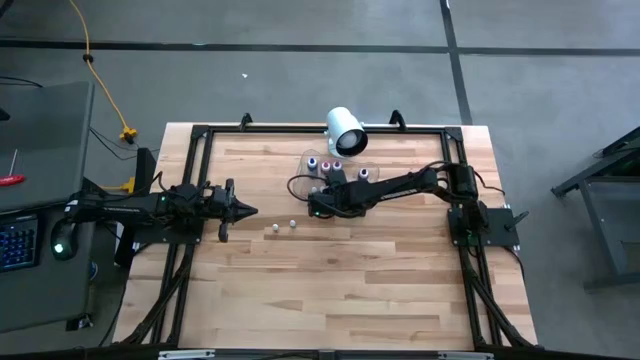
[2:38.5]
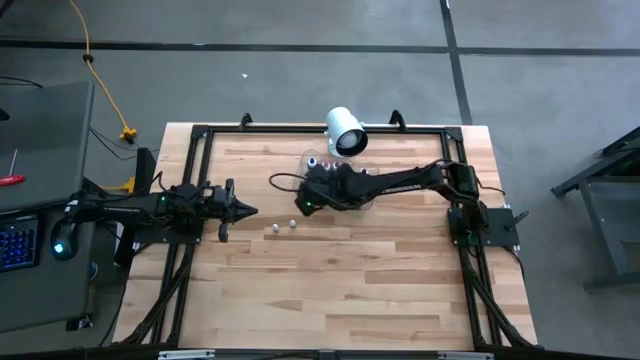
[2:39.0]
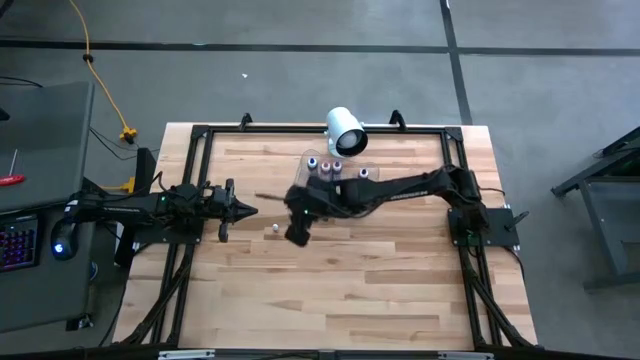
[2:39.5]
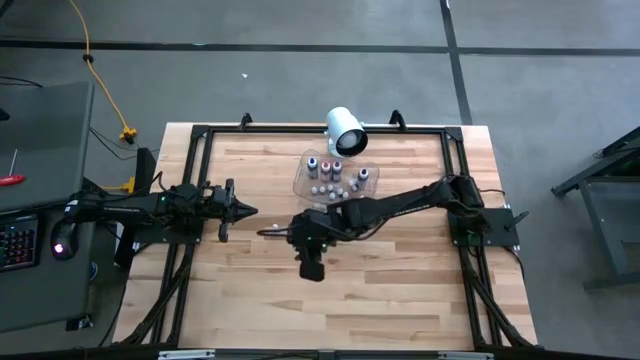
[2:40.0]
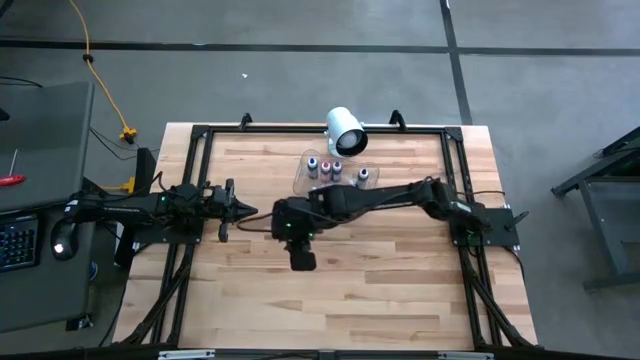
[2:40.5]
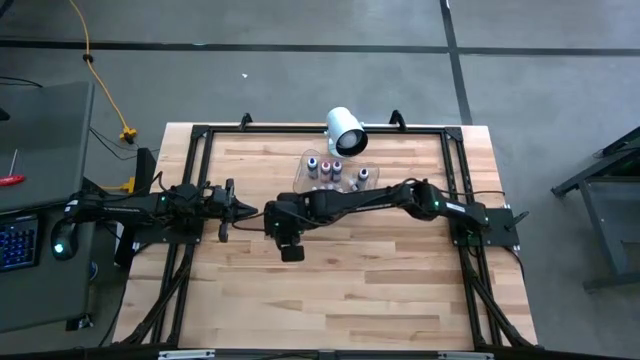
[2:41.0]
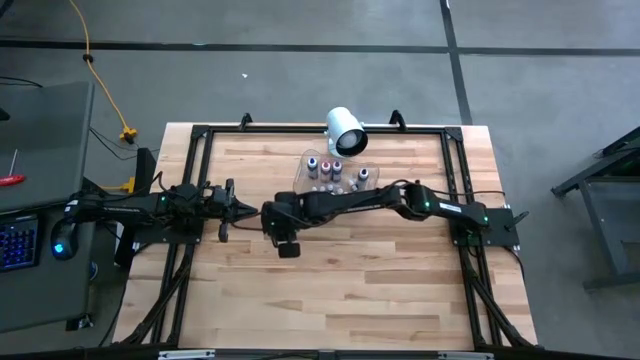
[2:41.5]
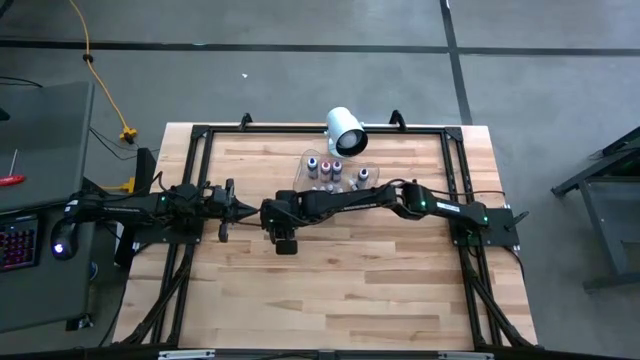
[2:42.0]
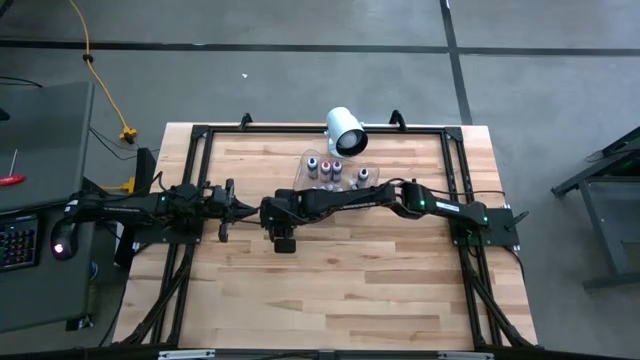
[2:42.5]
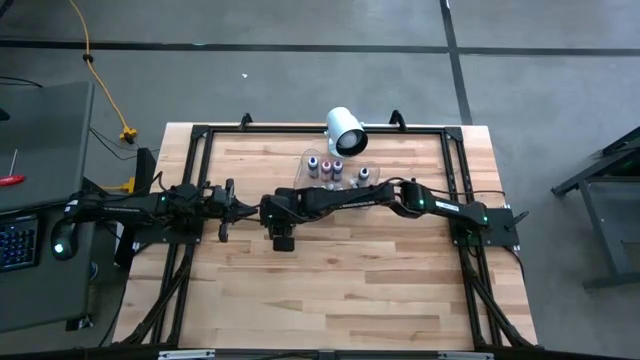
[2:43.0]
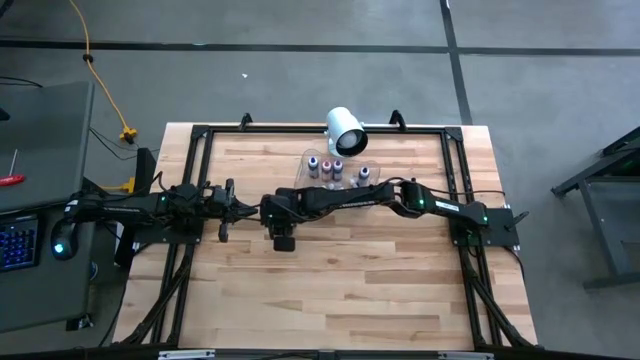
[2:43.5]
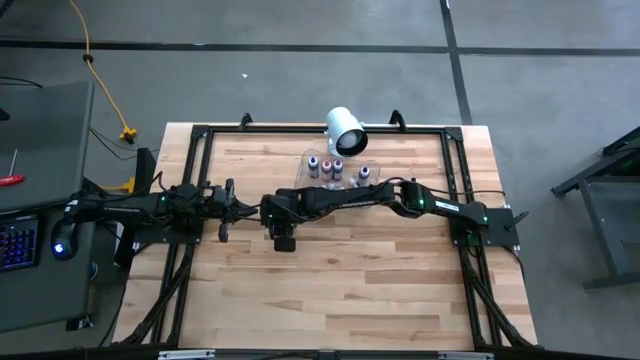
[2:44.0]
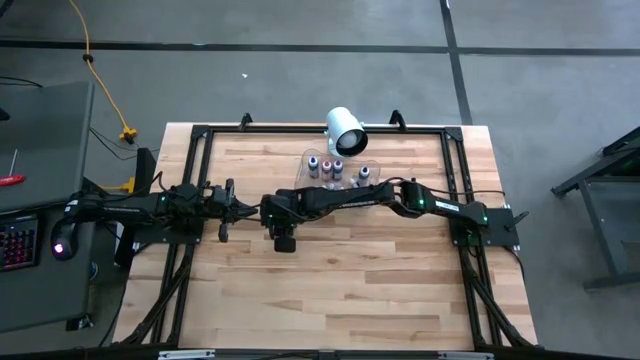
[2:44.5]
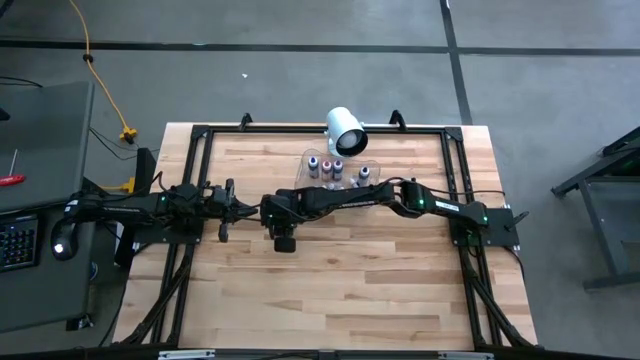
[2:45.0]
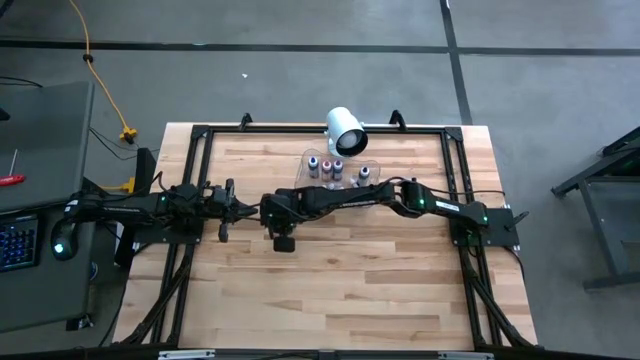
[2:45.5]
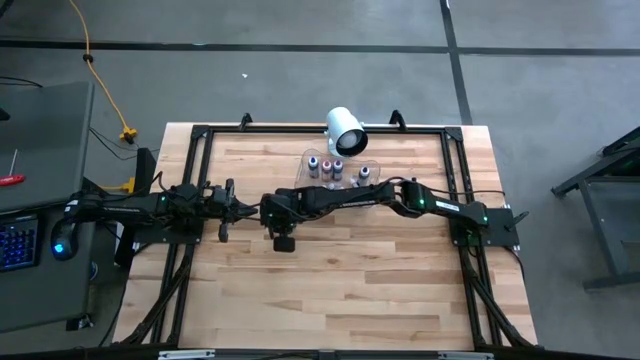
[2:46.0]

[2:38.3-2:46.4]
Task: Pick & Place food coloring
Put the small red food coloring bottle into the transparent bin

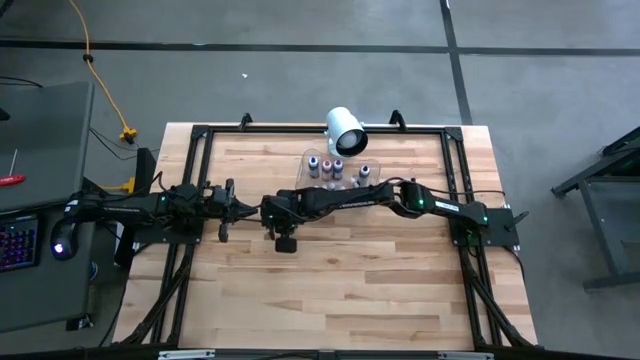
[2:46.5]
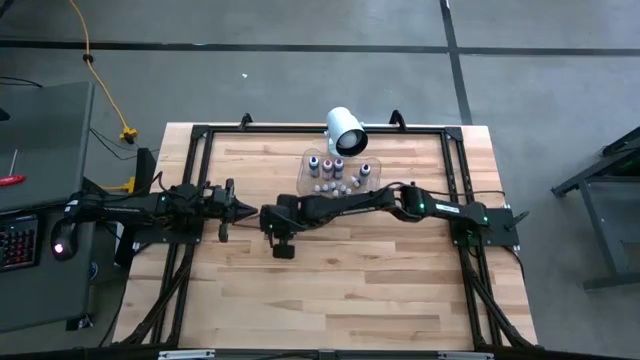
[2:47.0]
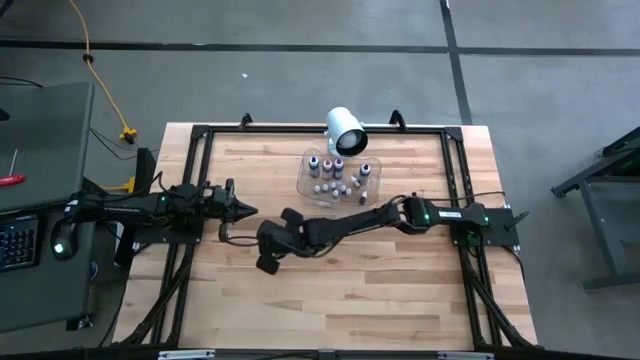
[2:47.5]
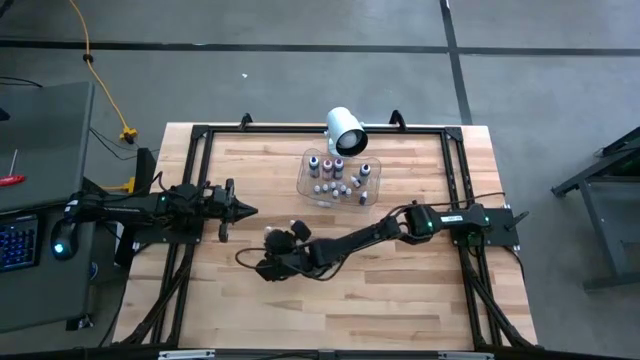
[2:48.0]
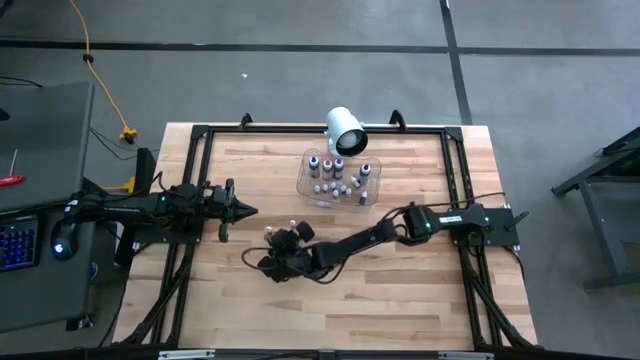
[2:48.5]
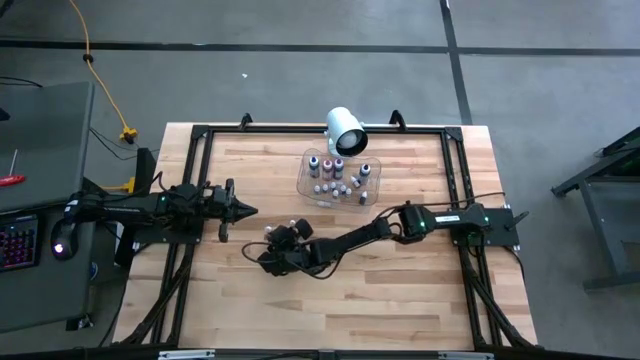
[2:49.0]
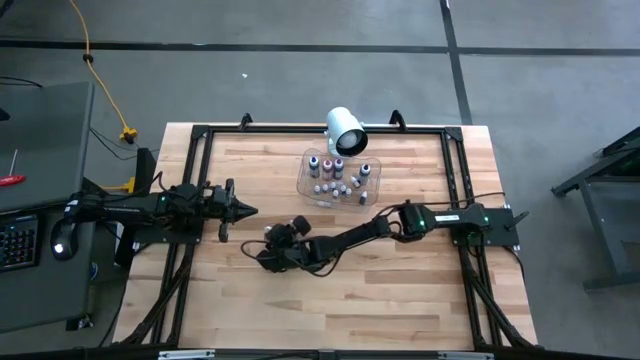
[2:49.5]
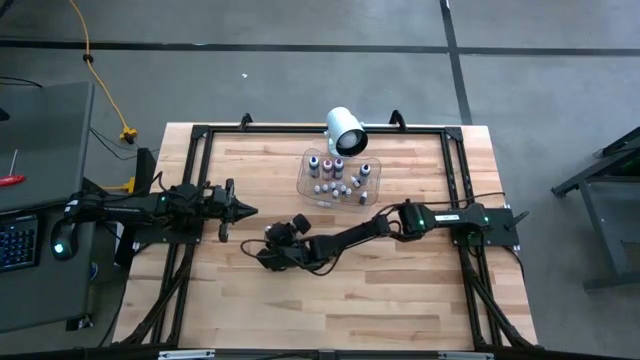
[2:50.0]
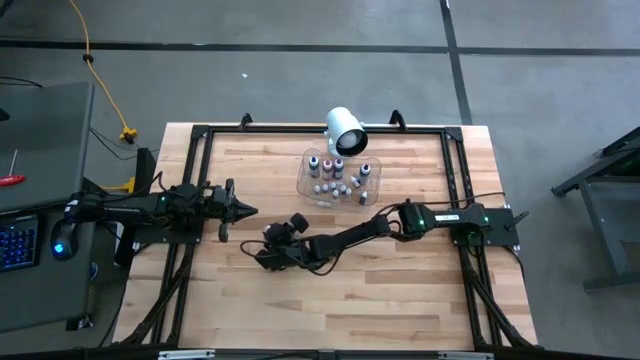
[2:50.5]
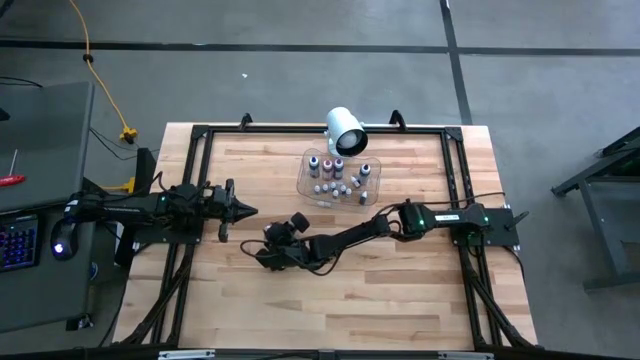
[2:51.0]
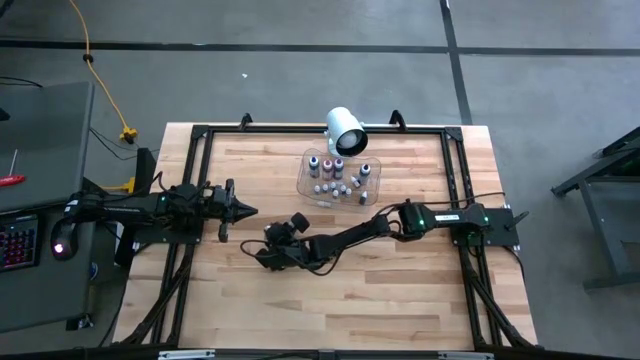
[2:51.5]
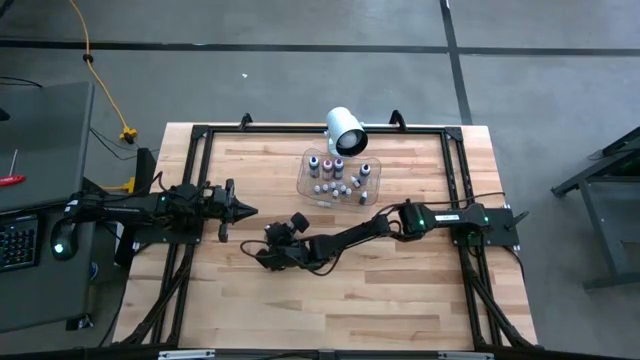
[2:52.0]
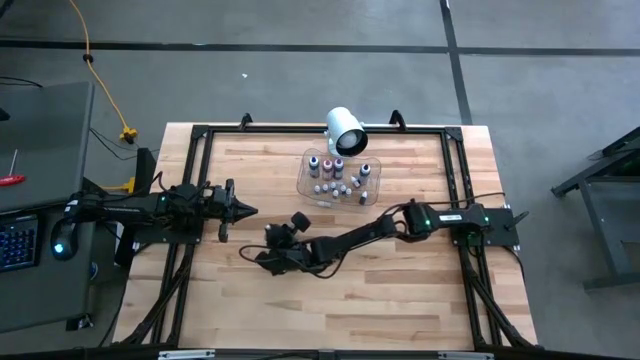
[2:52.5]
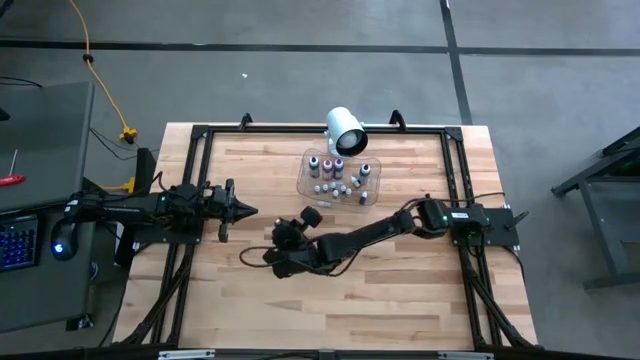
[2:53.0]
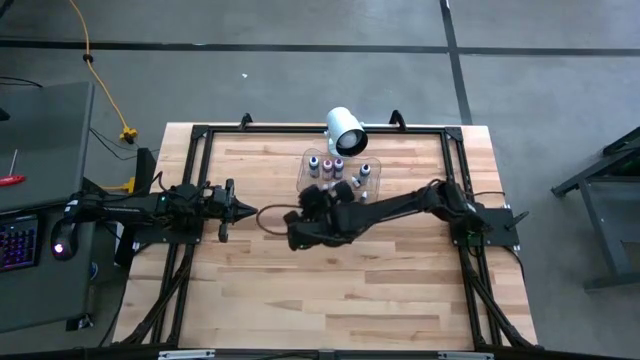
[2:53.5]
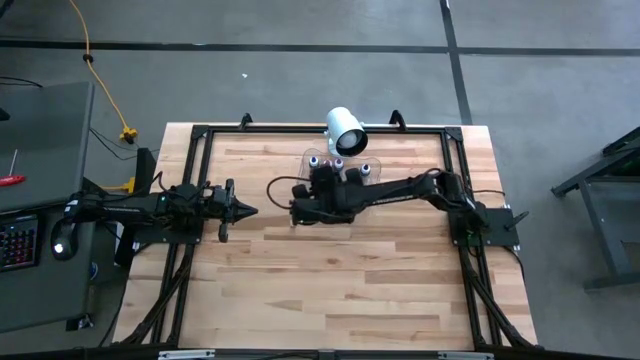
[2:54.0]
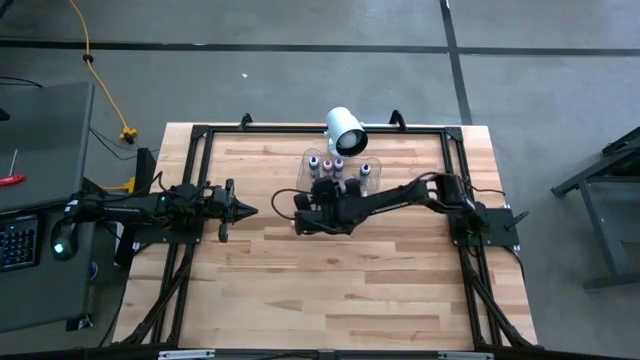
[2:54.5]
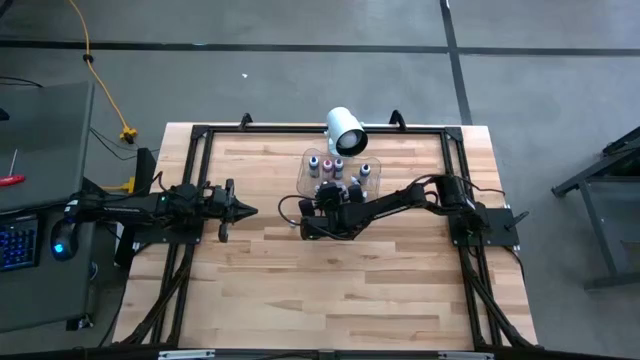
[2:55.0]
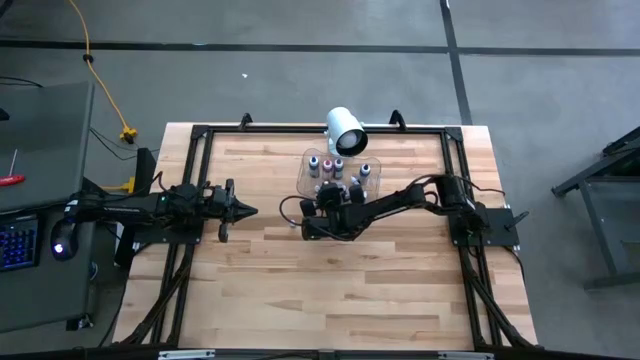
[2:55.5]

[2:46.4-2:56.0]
Put the small red food coloring bottle into the transparent bin

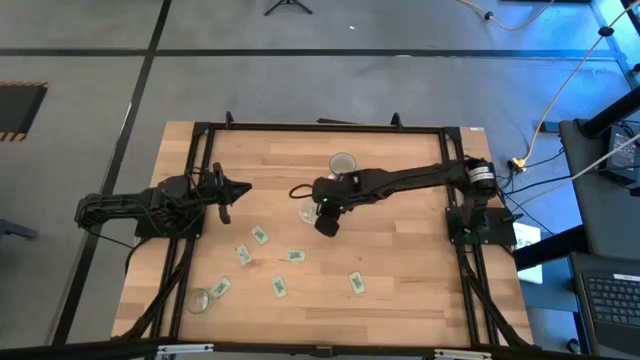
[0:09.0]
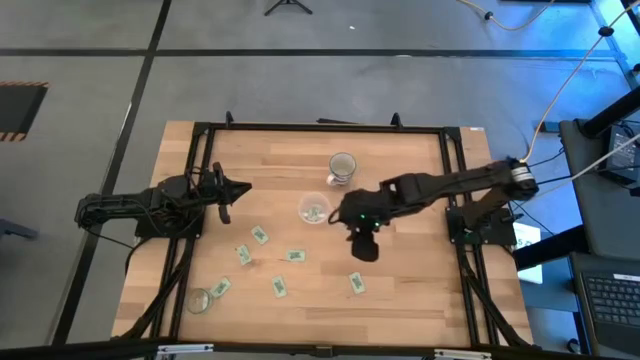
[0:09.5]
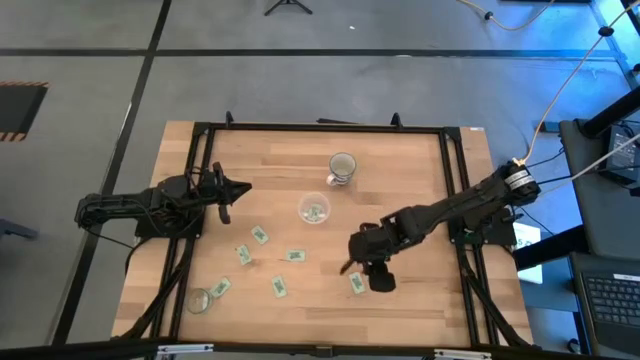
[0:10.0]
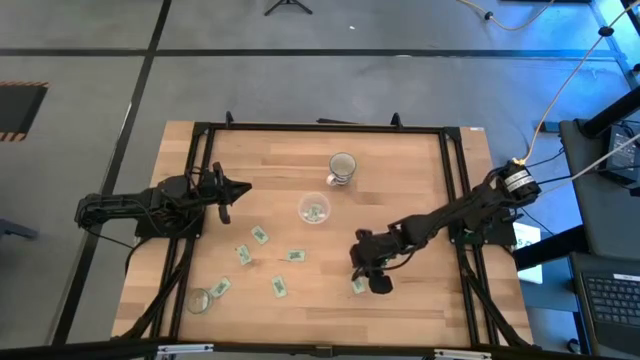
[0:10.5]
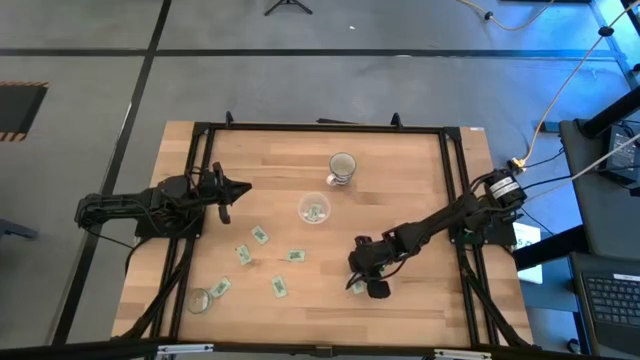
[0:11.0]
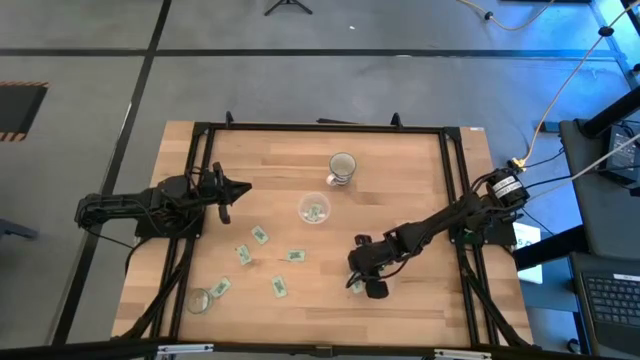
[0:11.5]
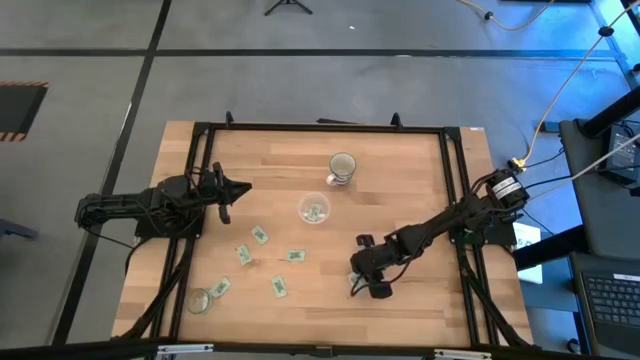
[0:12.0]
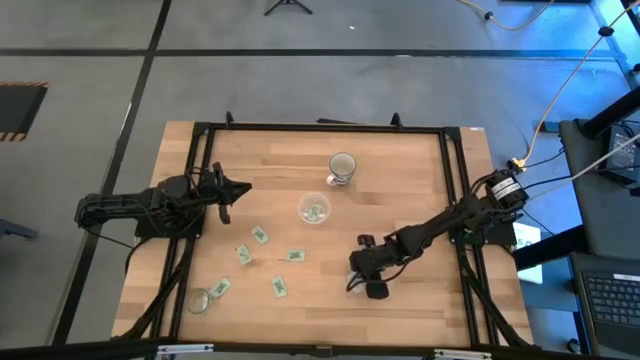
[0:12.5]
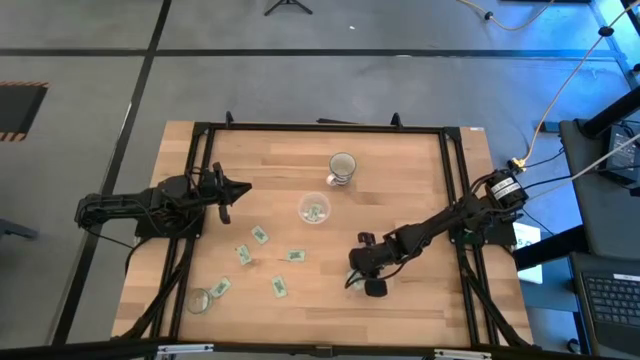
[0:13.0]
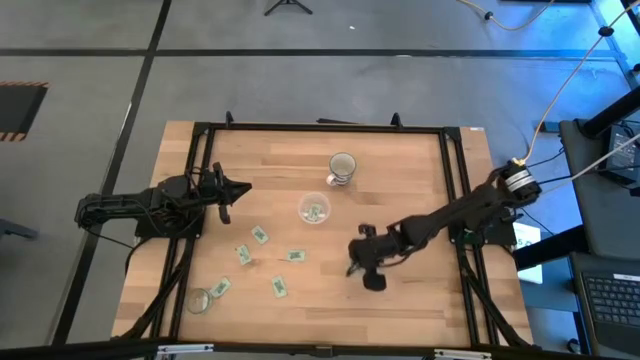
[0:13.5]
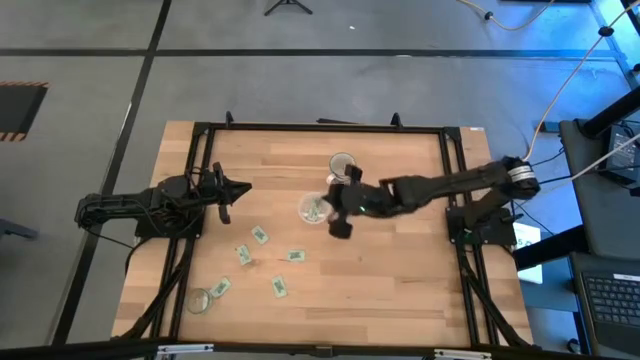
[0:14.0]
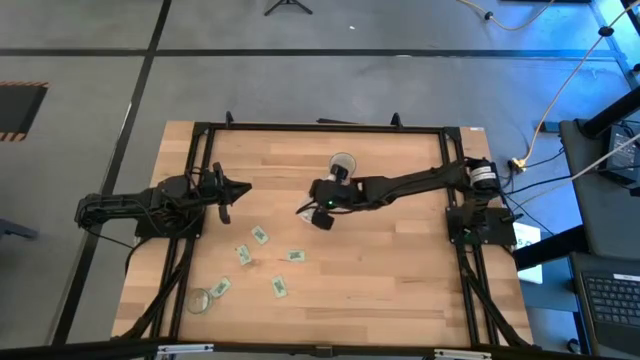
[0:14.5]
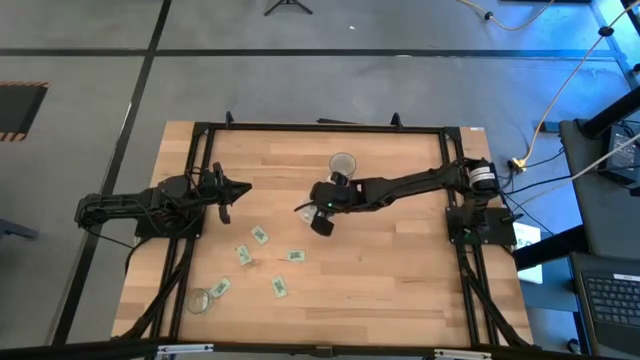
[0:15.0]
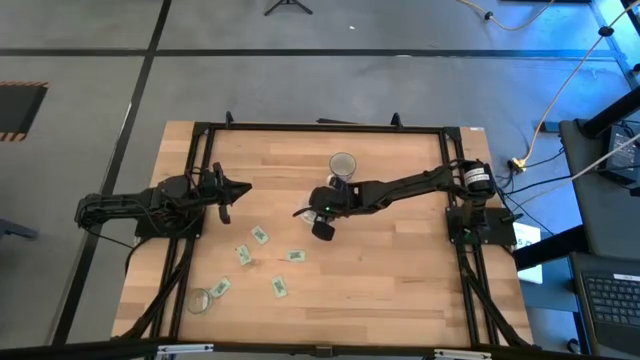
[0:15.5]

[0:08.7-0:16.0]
Task: Pick and place Stevia / Truvia into bins
Put the stevia packet into the transparent container
